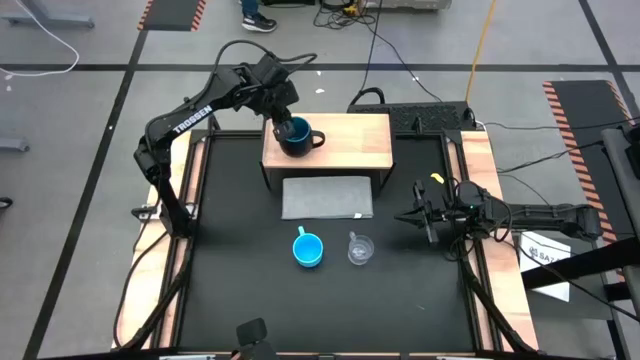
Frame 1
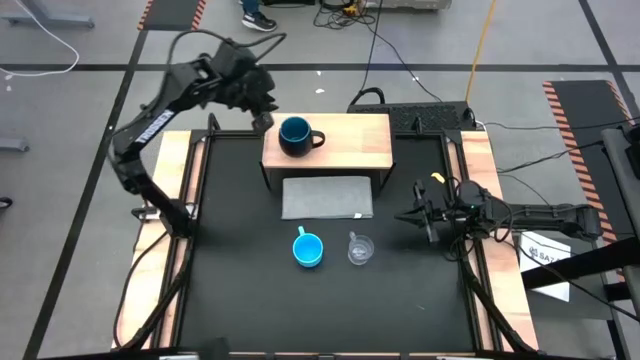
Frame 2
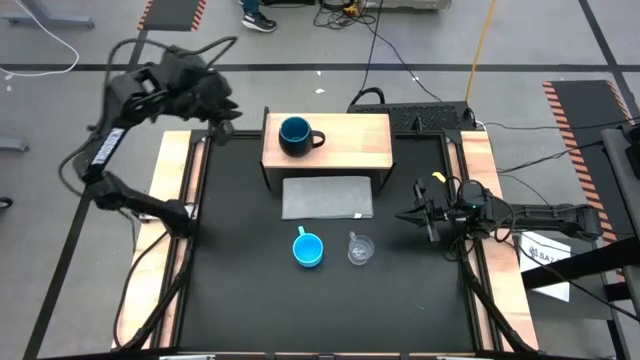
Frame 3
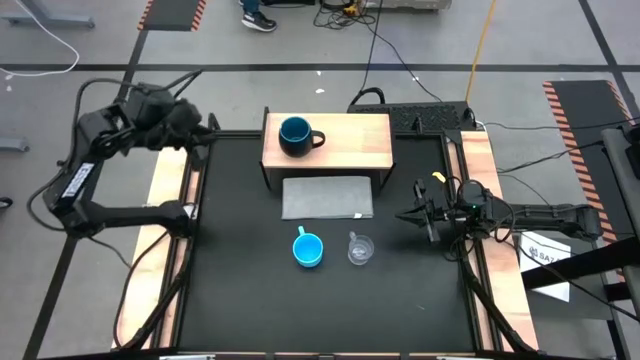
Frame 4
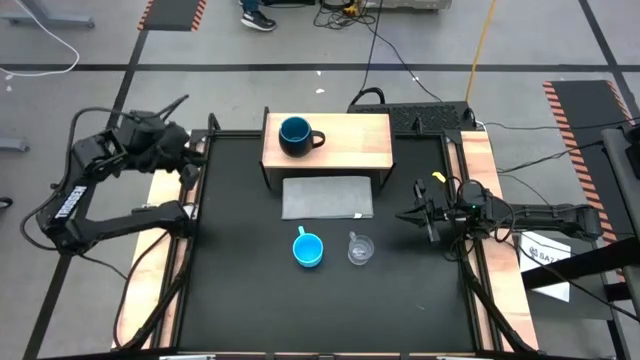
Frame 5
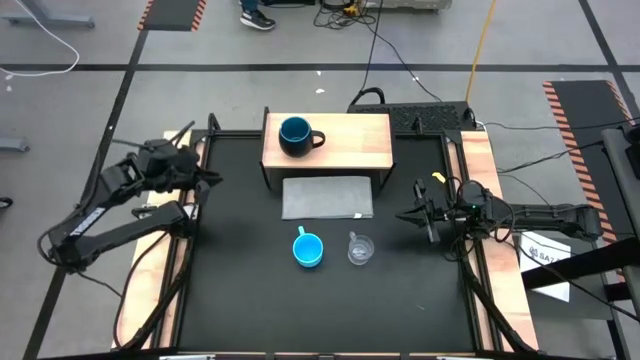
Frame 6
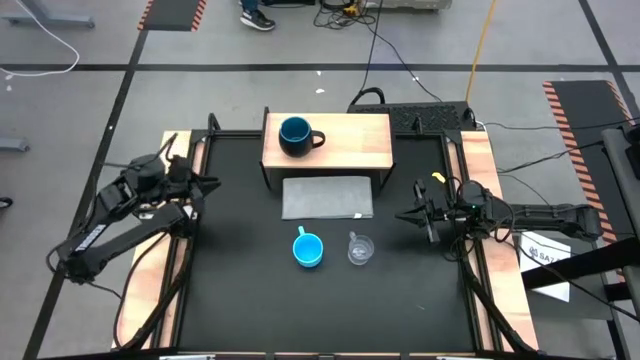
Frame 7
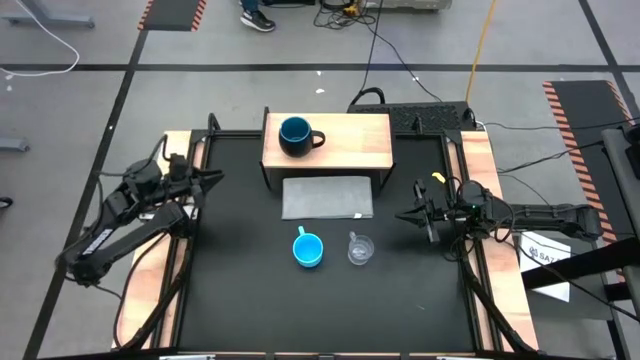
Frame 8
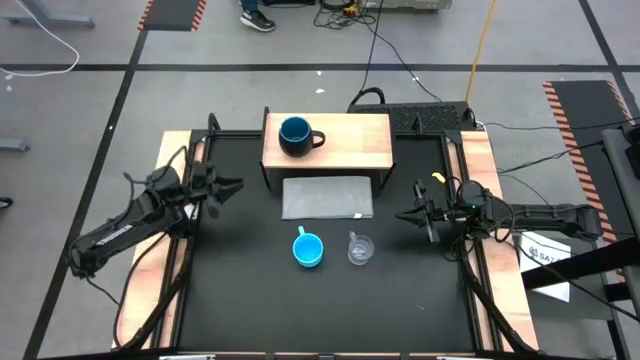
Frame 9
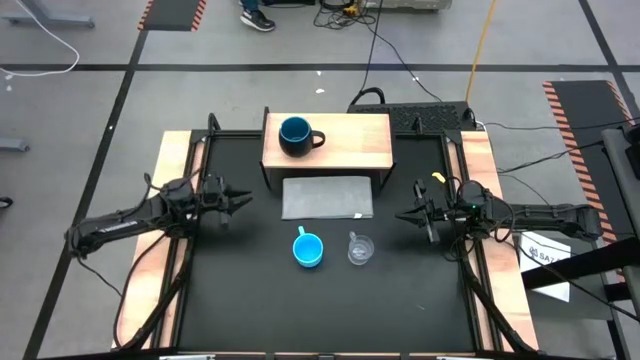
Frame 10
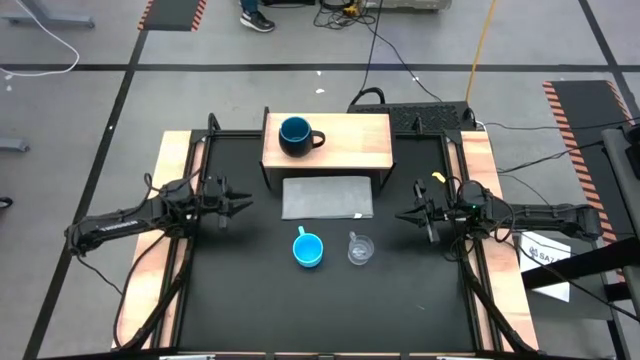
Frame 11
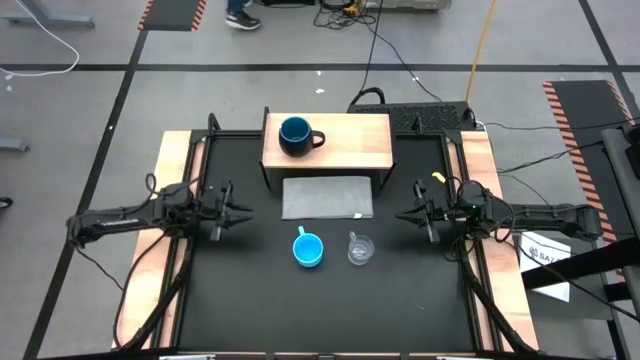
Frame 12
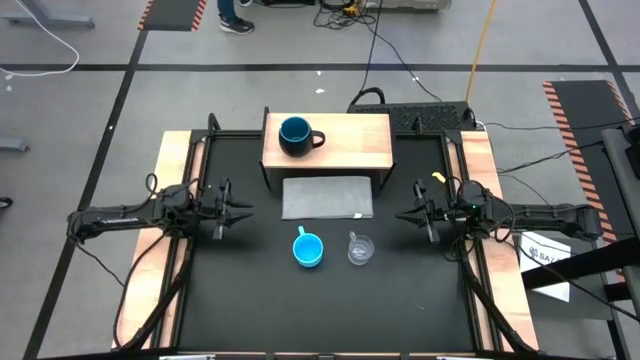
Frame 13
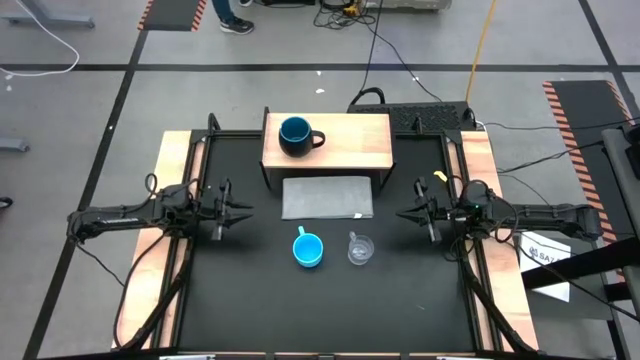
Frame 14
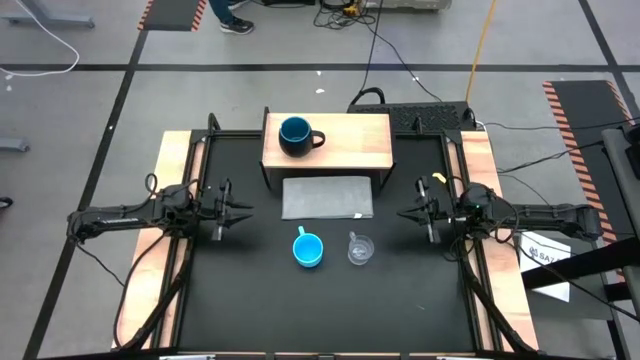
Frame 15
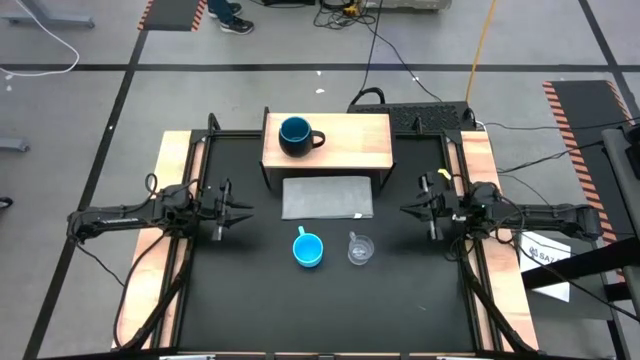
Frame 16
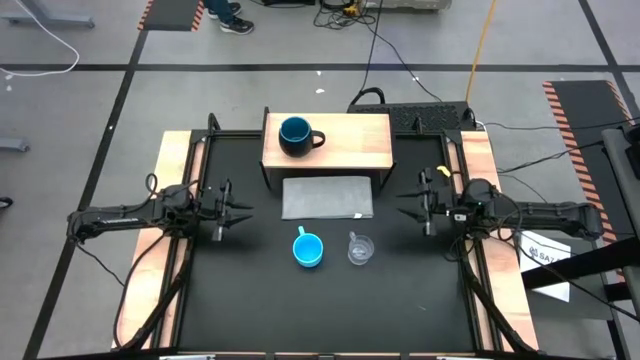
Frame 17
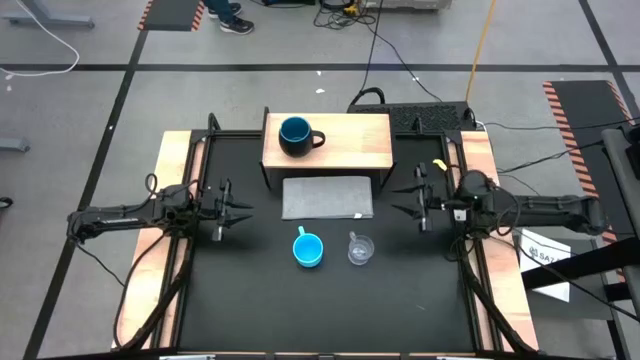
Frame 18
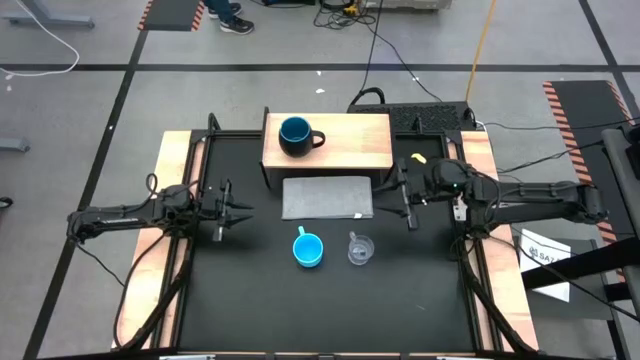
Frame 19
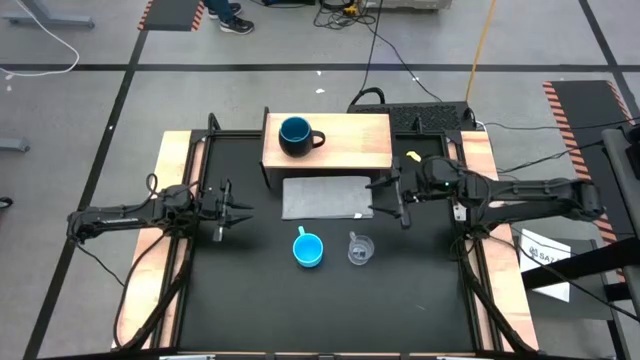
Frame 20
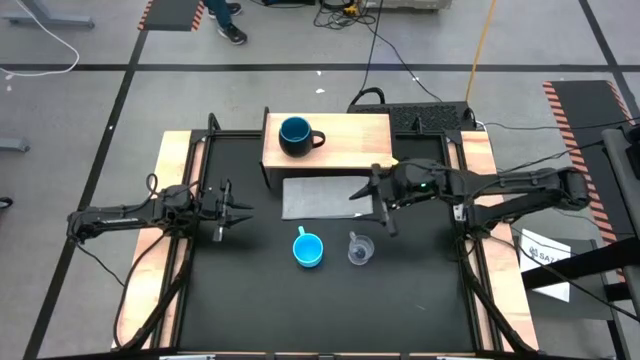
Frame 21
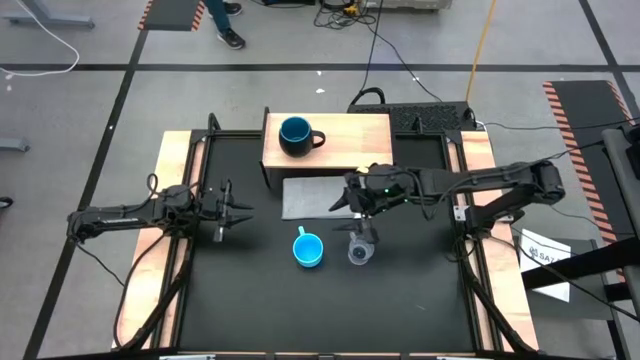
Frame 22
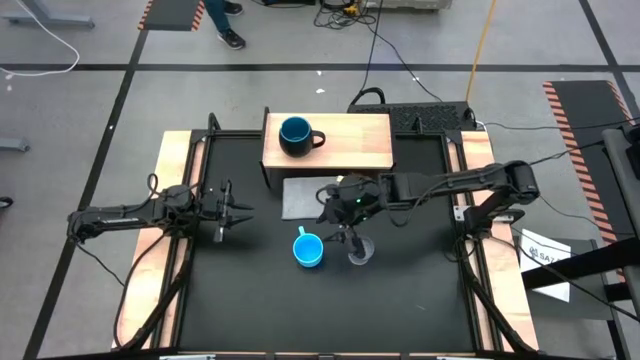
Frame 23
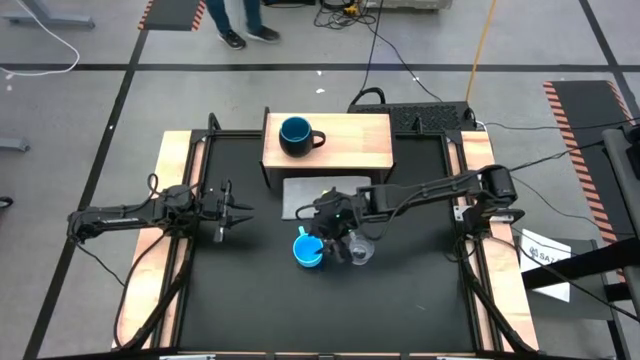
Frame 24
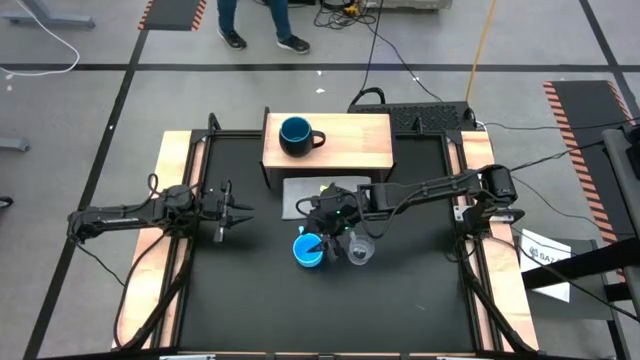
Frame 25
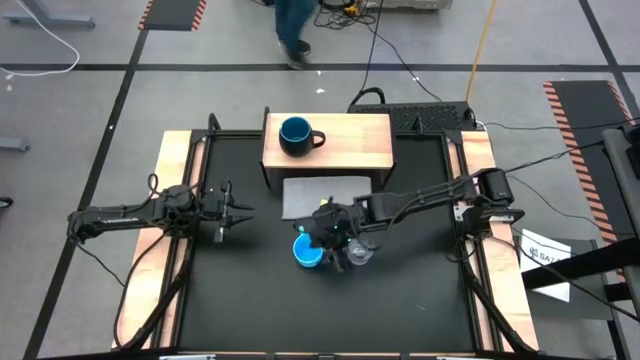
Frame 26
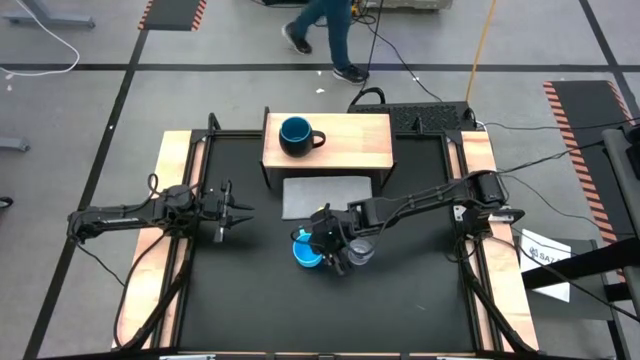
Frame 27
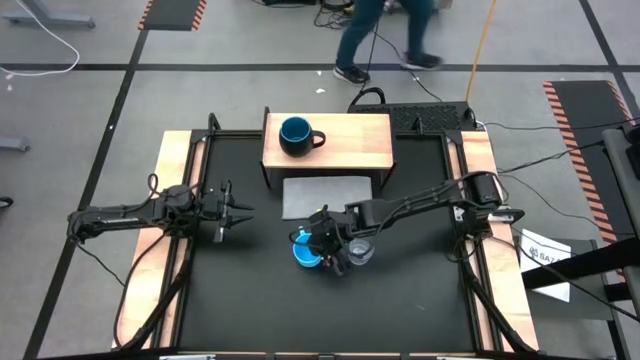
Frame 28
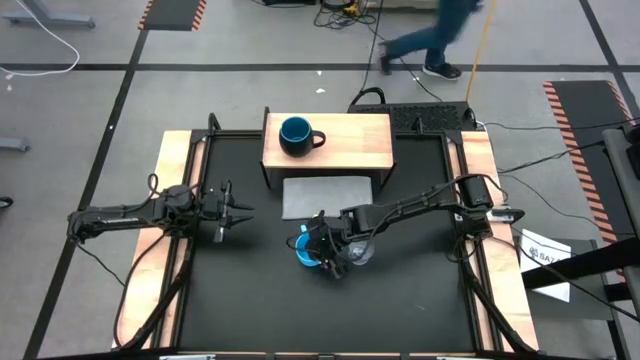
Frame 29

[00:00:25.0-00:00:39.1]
Task: Stack small to large cups/mugs on shelf
Put the blue mug on the shelf

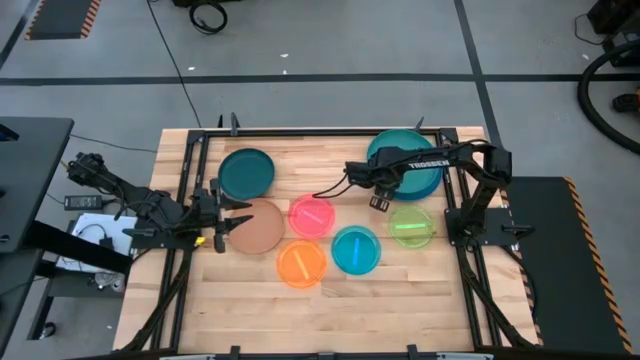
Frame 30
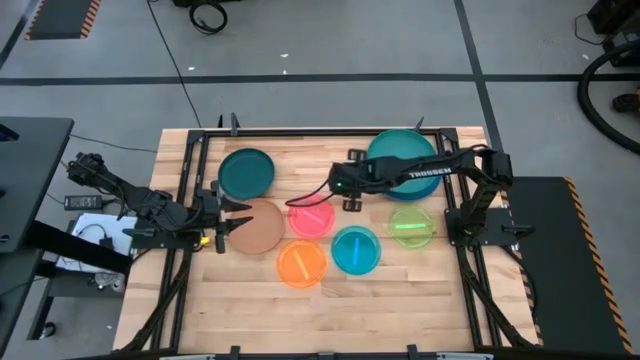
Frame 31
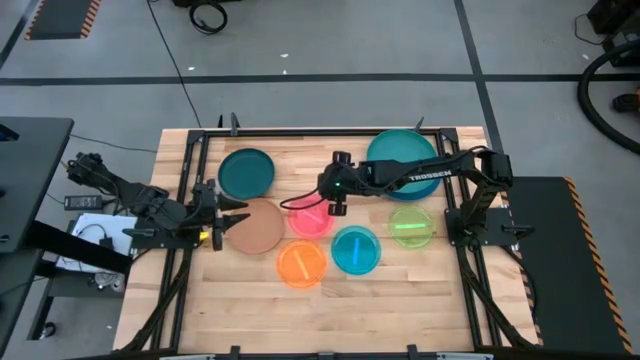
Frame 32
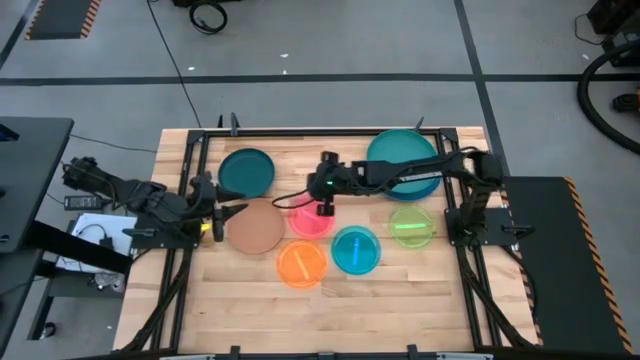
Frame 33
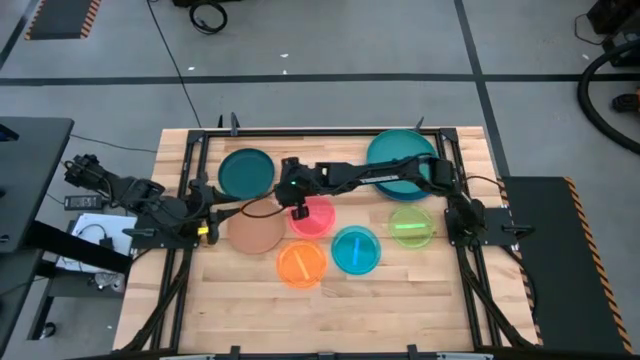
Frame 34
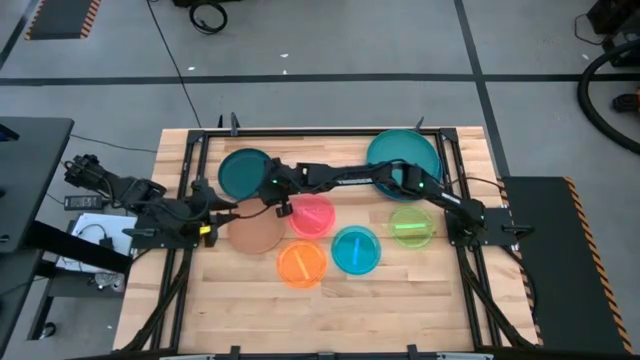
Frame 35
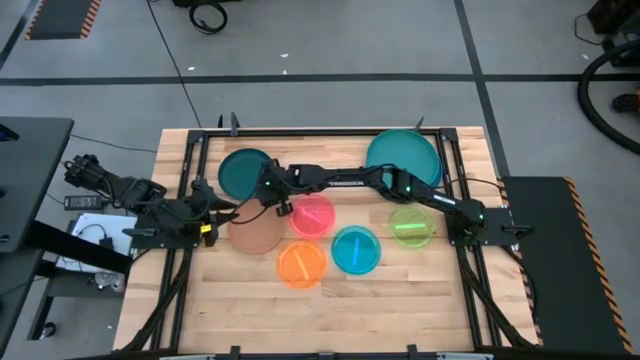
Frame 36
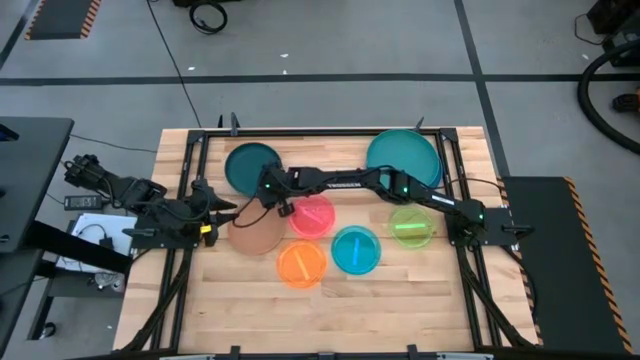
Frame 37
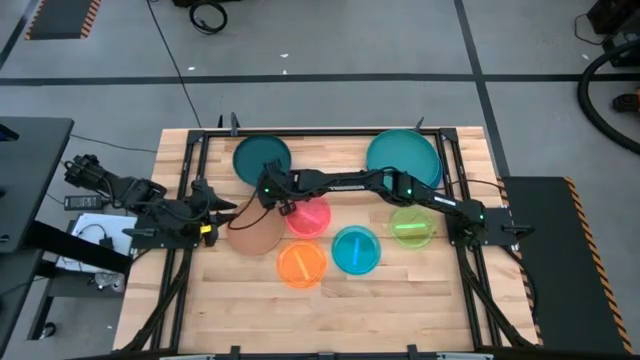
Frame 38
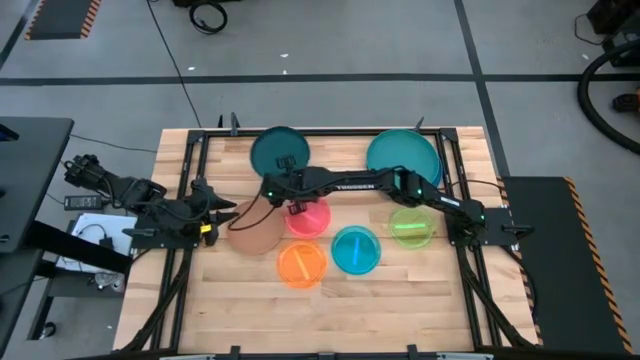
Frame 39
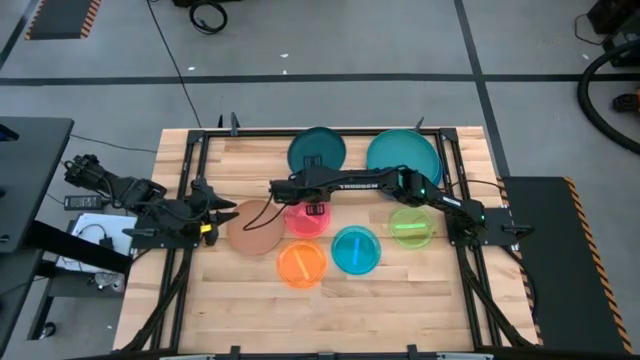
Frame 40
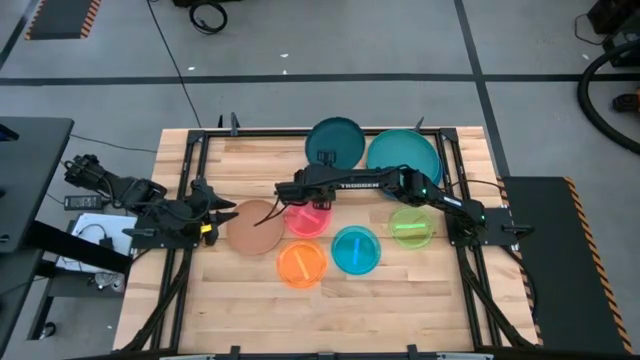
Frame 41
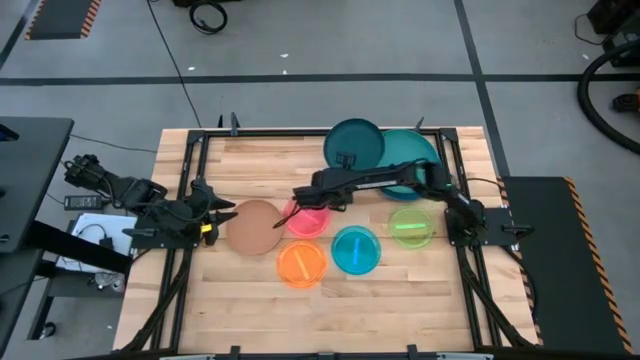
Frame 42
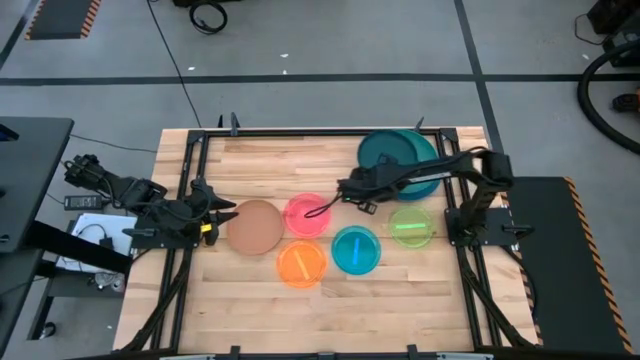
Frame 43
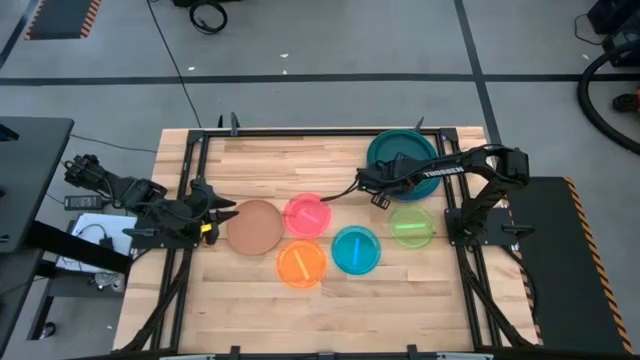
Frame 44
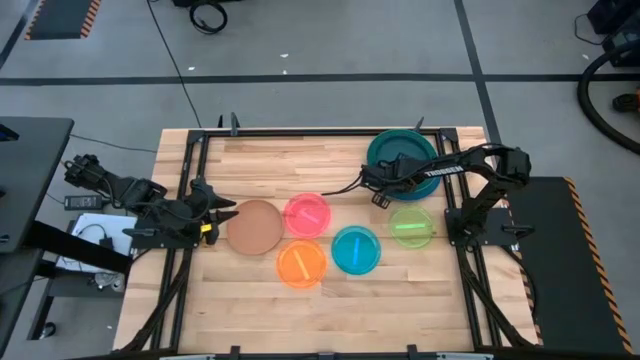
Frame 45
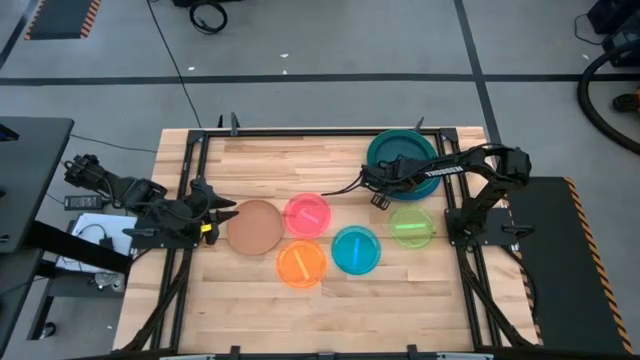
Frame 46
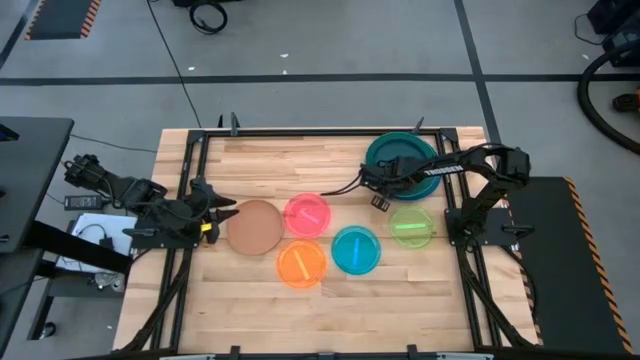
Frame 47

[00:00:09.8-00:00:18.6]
Task: Stack plastic plates
Stack the dark green plate on top of the green plate
